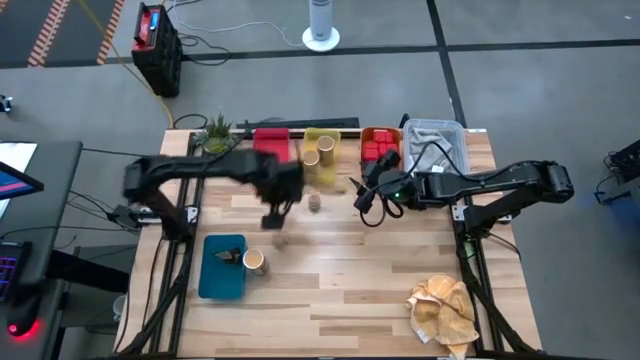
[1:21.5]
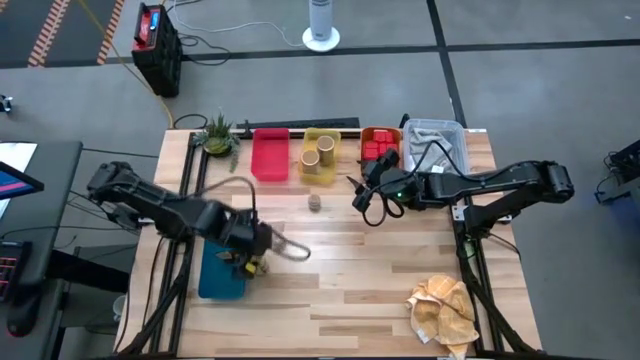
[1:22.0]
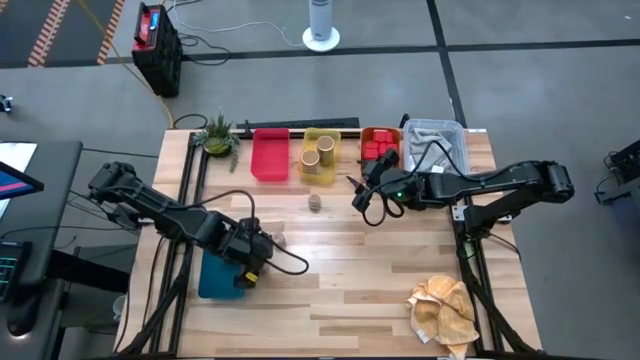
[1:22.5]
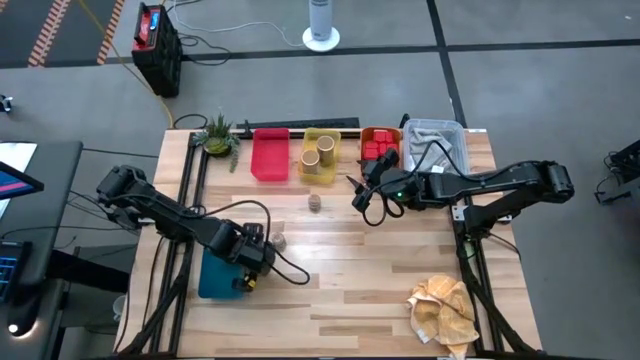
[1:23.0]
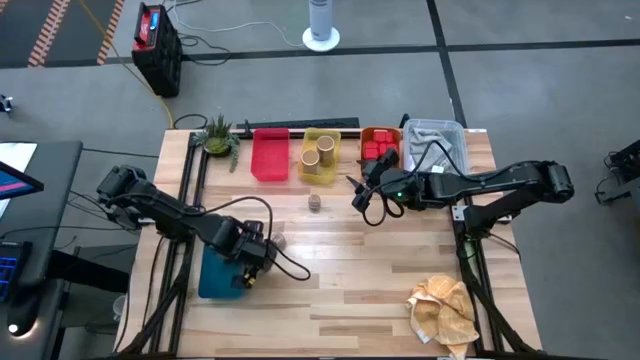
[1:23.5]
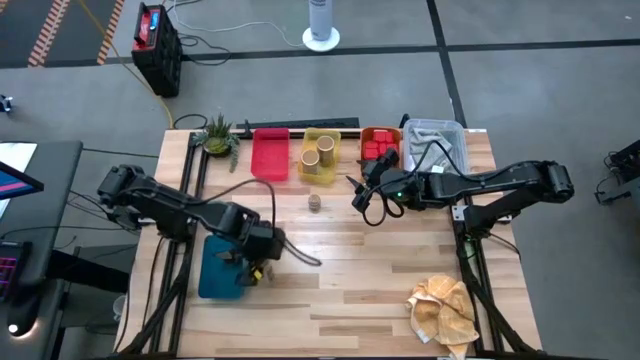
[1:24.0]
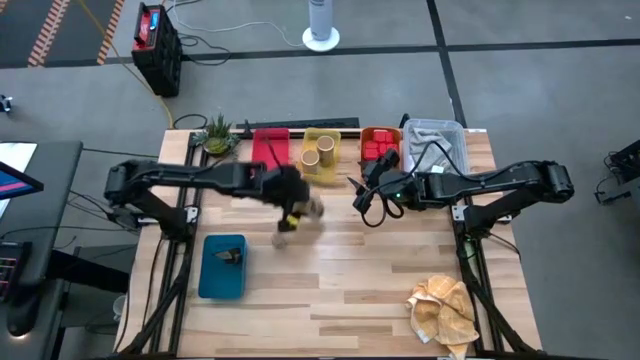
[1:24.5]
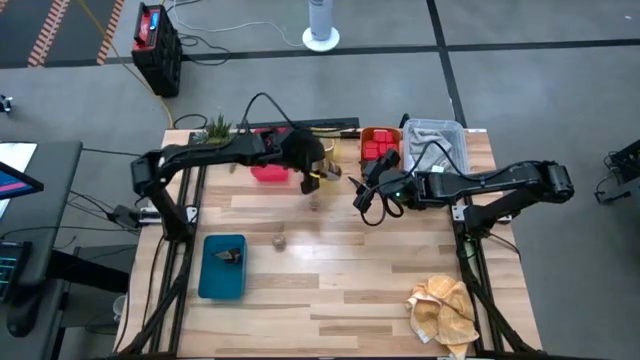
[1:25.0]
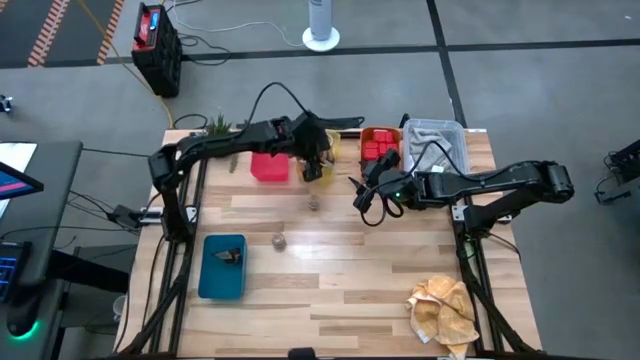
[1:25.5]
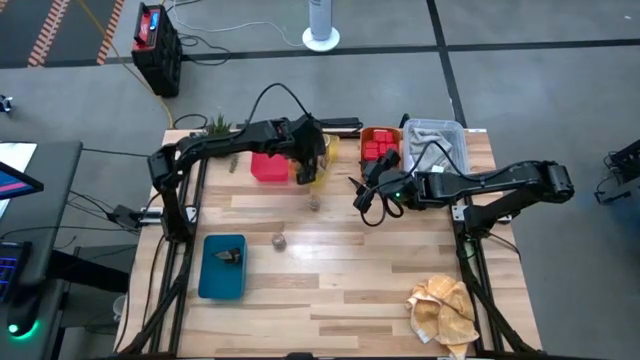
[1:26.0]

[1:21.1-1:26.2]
Task: Sort spices by type
Put the gold seasoning bottle into the yellow bin

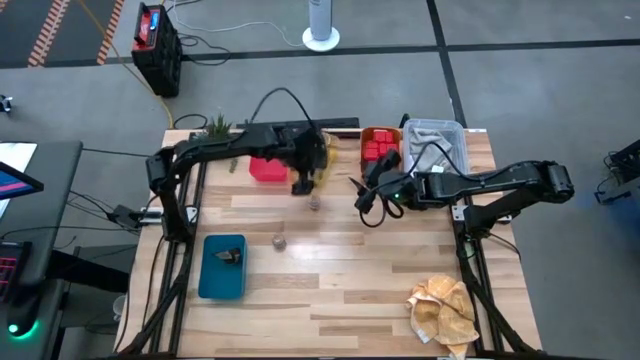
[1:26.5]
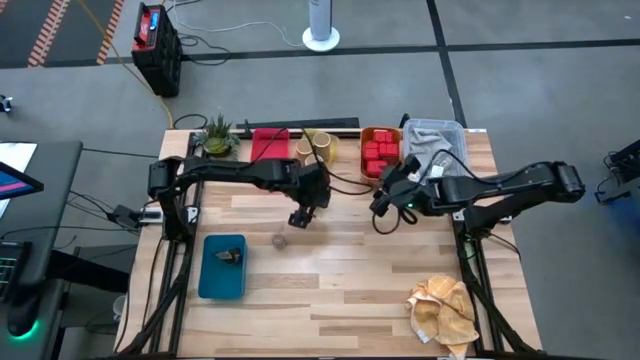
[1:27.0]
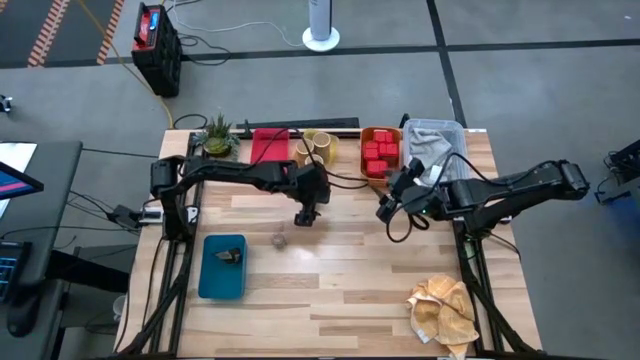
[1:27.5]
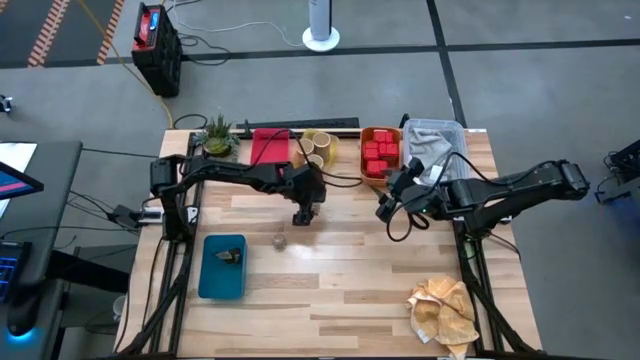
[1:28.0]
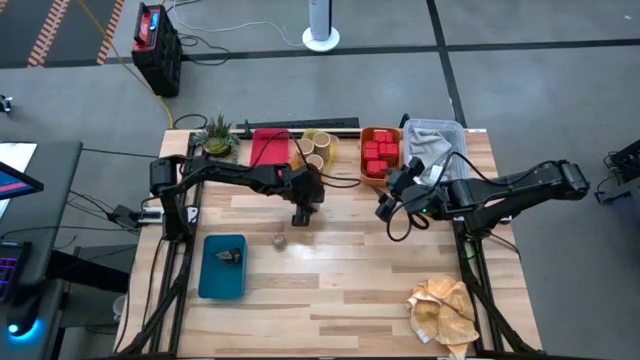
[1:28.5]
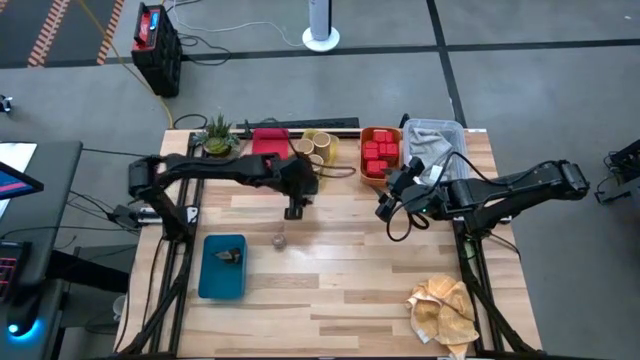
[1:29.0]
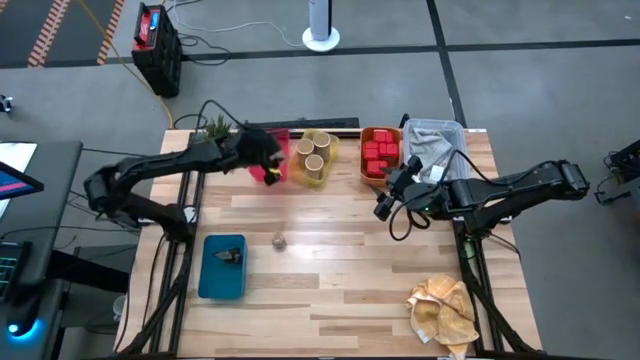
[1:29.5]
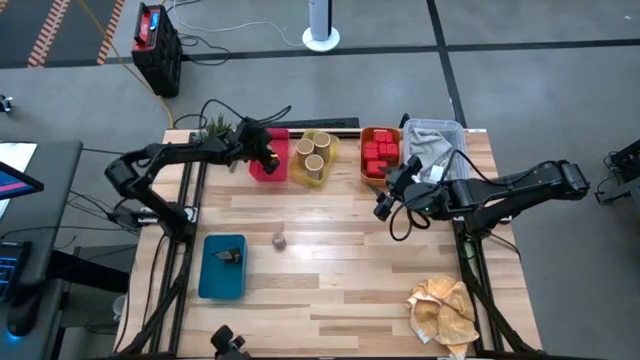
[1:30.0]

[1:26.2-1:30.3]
Put the brown seasoning bottle into the red bin

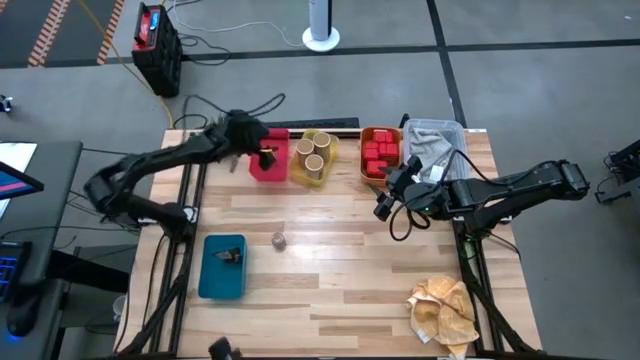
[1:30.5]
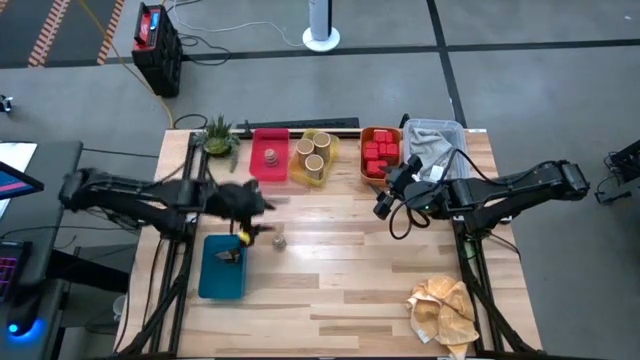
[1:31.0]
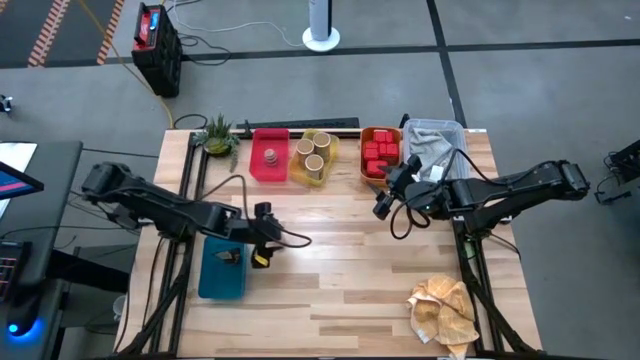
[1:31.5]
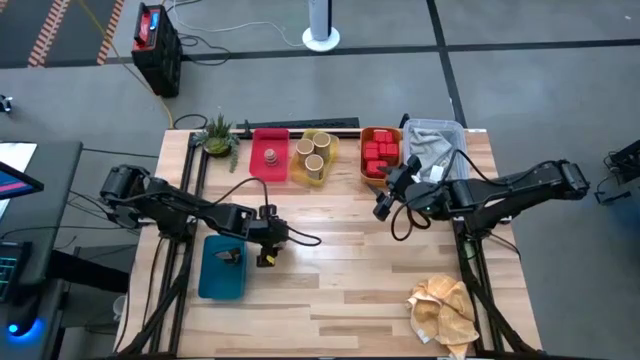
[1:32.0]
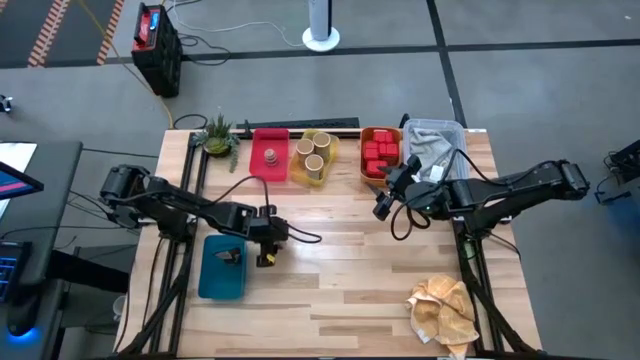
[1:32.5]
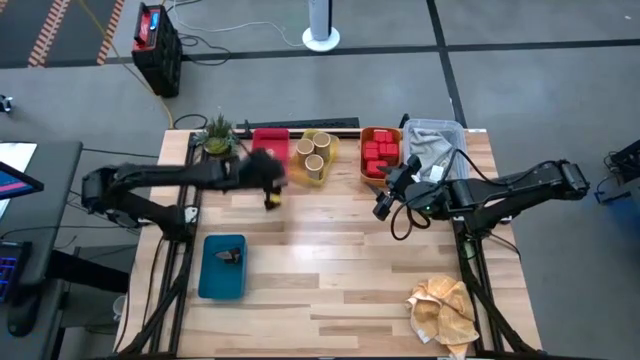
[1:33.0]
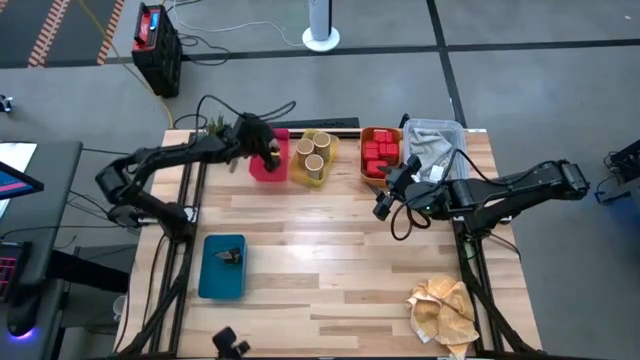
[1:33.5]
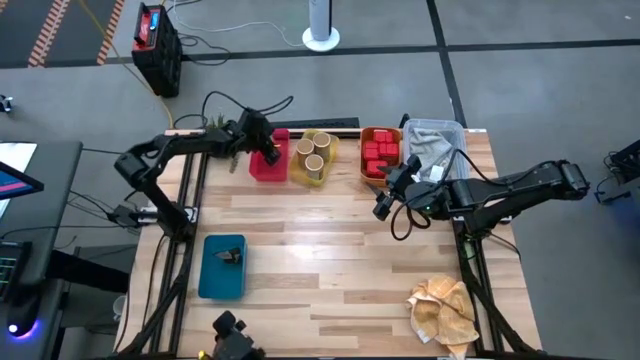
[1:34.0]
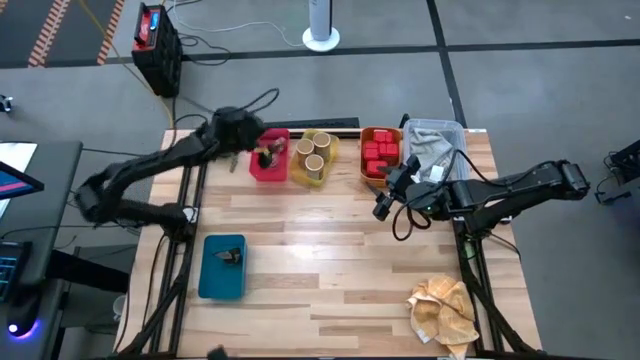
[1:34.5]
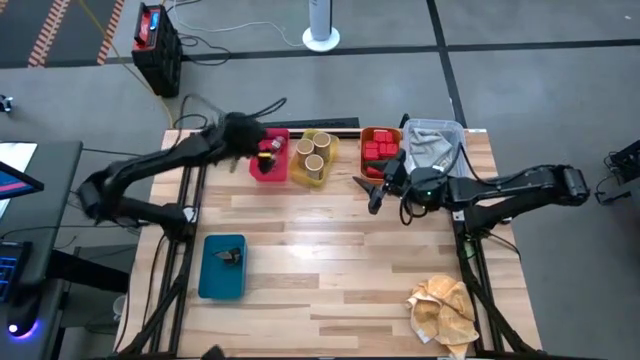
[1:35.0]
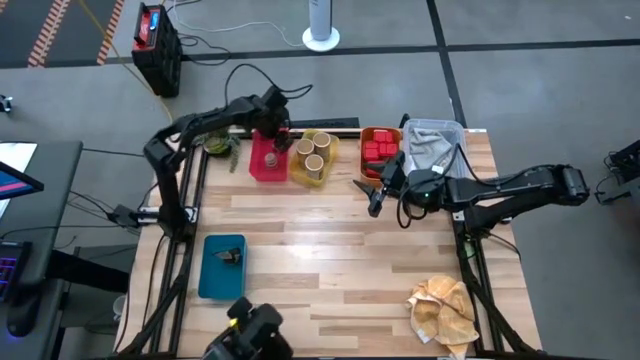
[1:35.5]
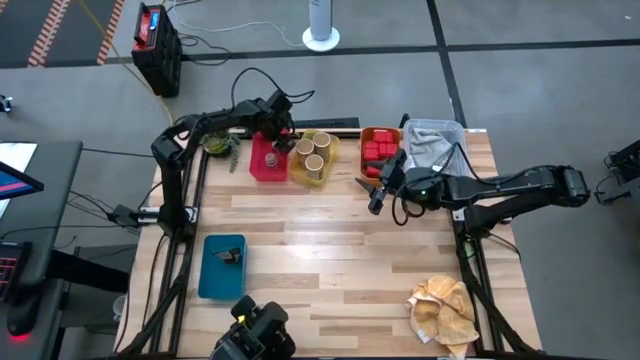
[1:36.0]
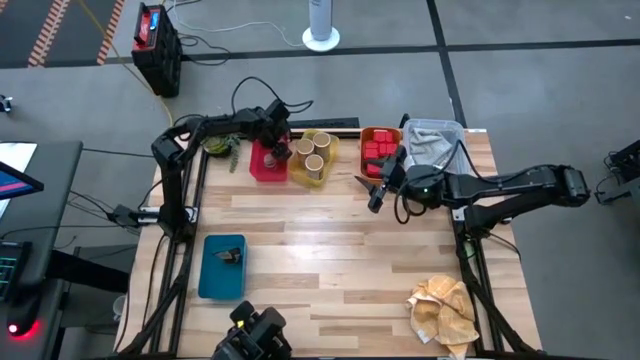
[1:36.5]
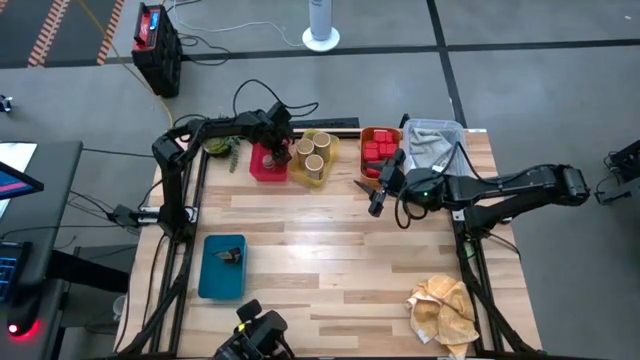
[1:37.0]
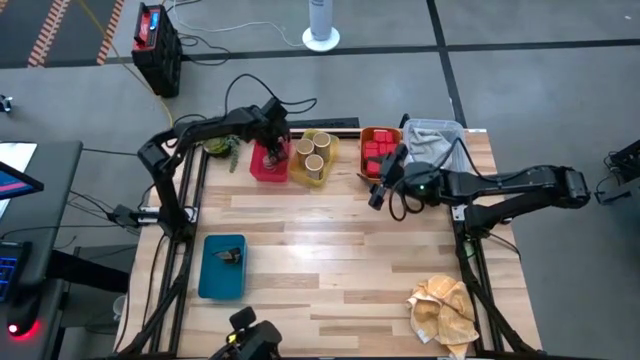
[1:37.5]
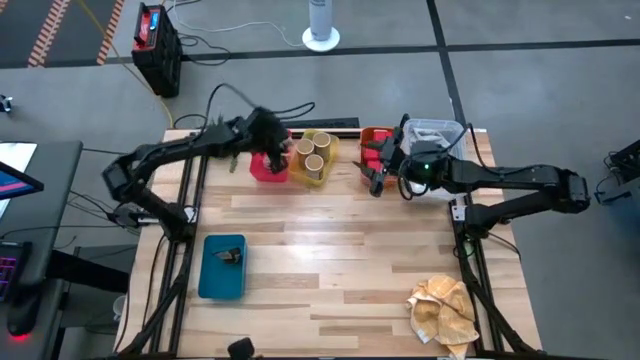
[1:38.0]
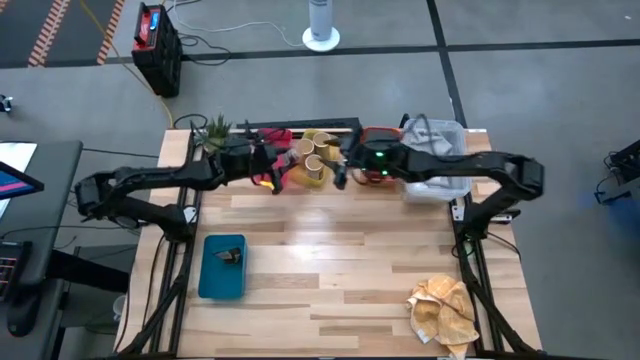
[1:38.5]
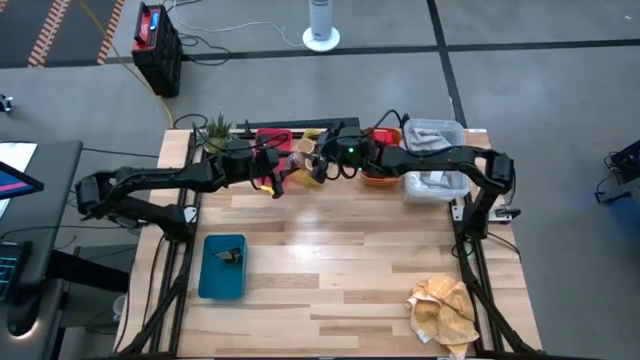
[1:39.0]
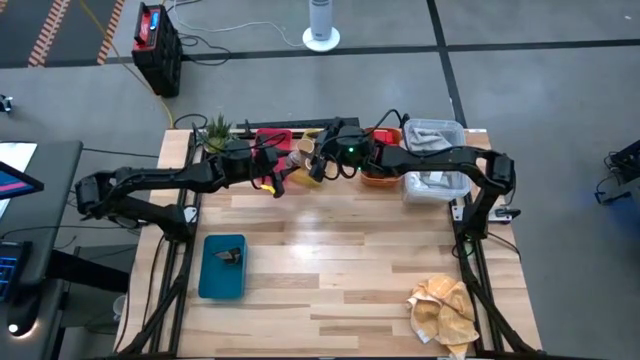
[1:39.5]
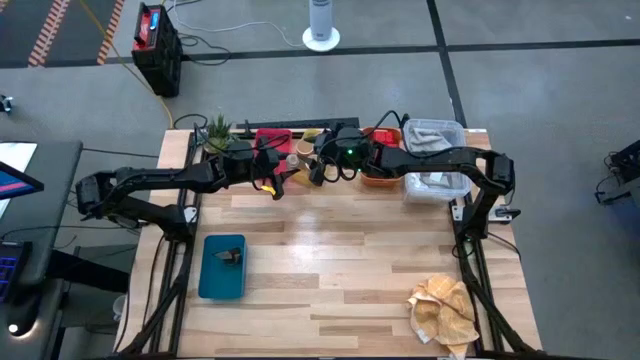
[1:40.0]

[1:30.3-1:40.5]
Put the brown seasoning bottle into the red bin

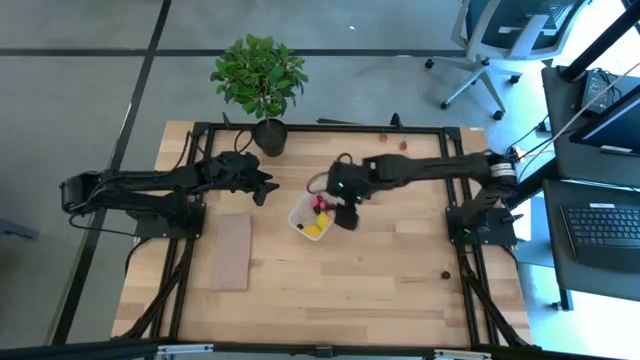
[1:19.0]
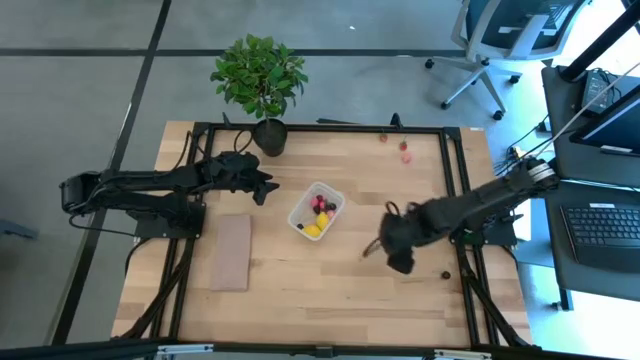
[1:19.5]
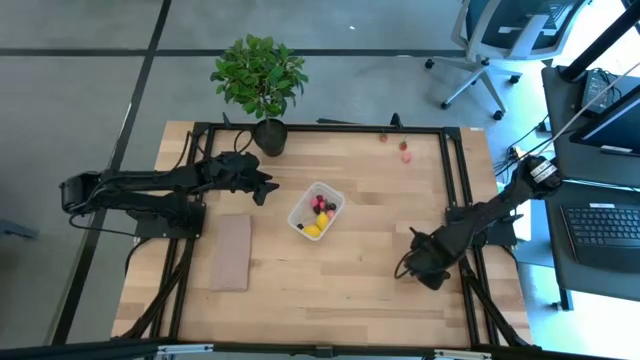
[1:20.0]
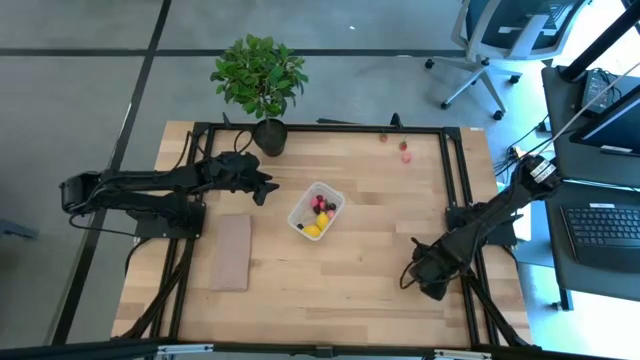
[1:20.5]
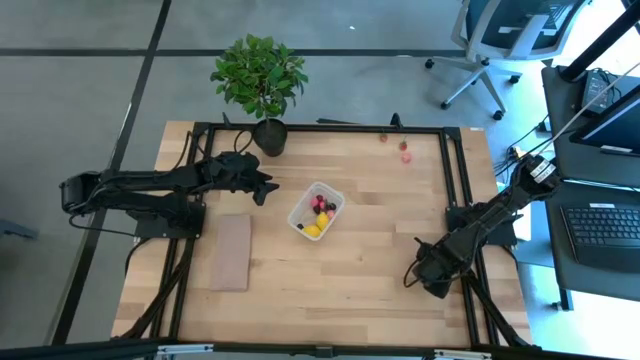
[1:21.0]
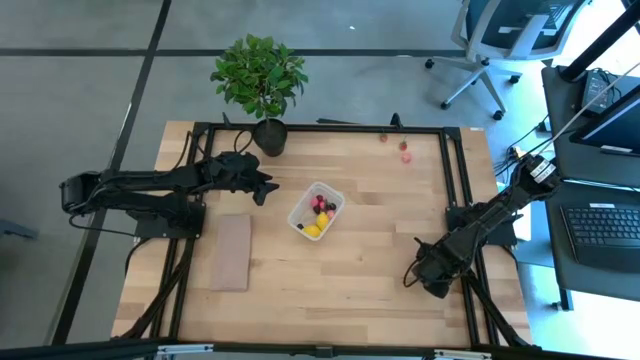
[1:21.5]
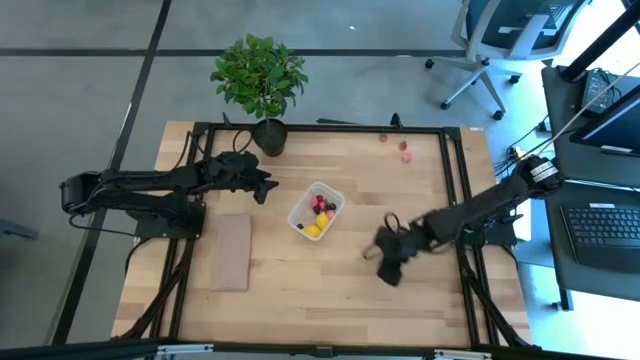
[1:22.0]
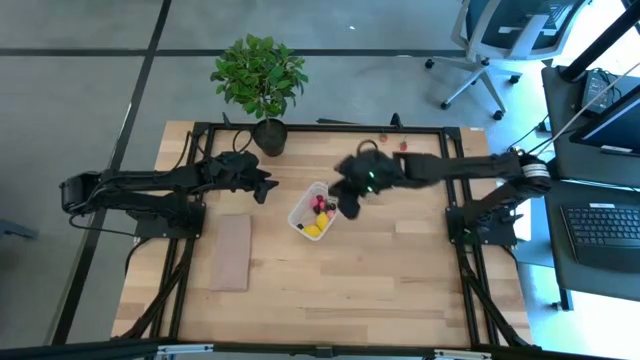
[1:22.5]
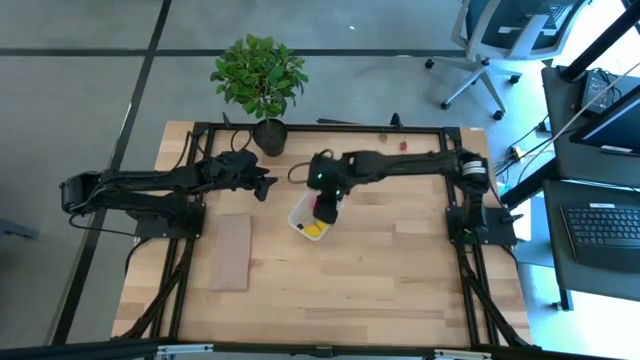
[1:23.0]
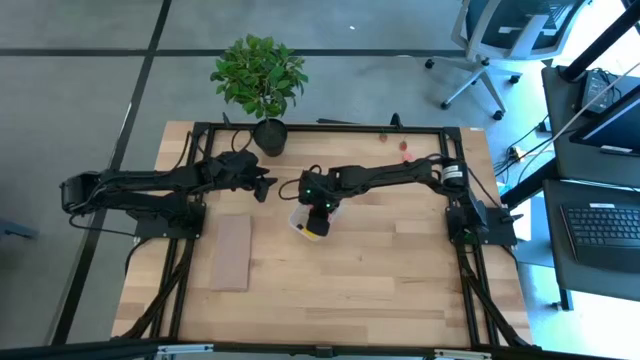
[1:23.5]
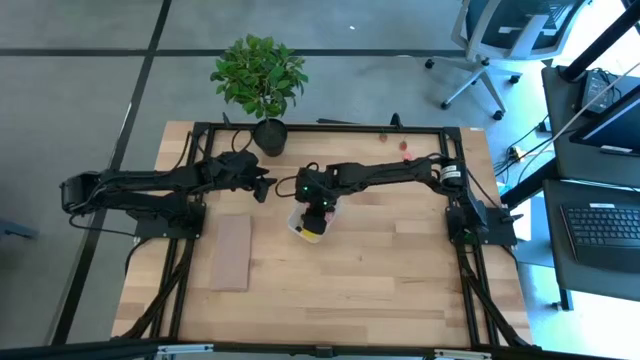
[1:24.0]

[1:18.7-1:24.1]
Task: Pick and placing Produce into tupperware
Put the black cherry into the transparent bin
